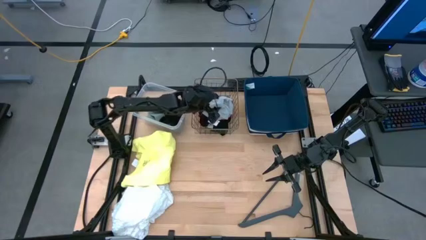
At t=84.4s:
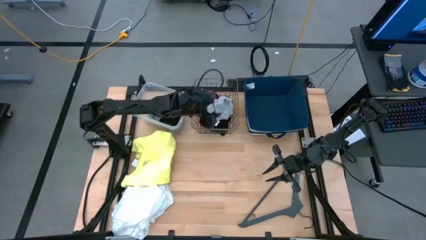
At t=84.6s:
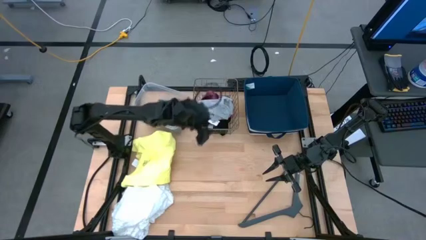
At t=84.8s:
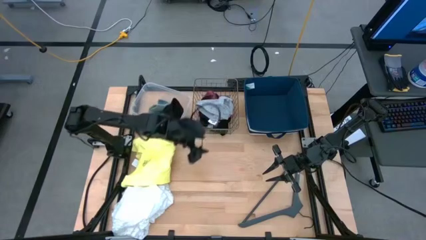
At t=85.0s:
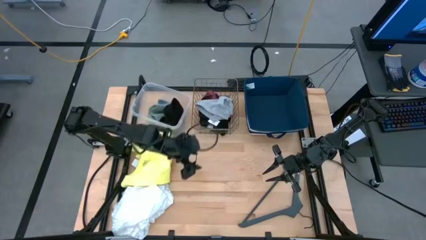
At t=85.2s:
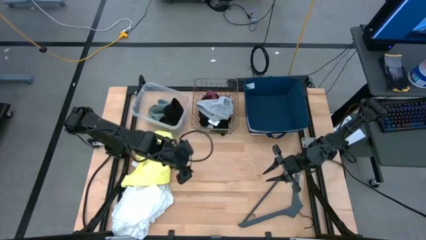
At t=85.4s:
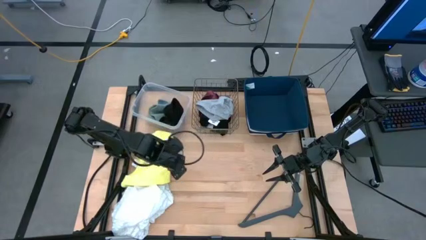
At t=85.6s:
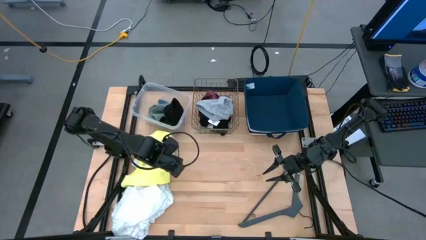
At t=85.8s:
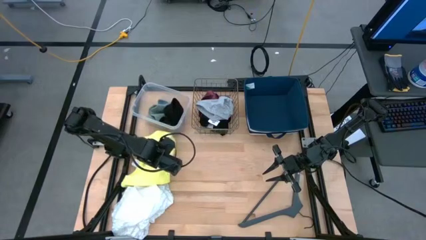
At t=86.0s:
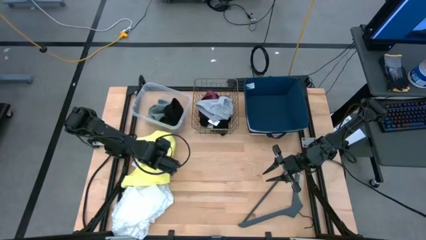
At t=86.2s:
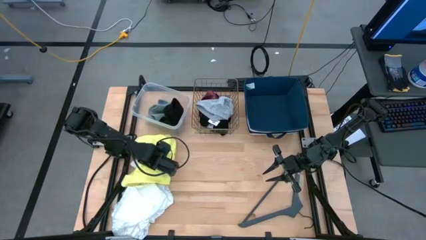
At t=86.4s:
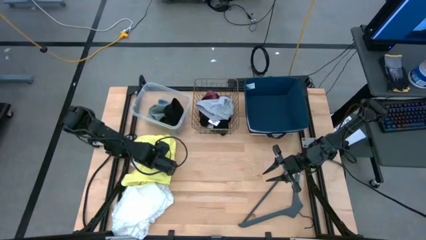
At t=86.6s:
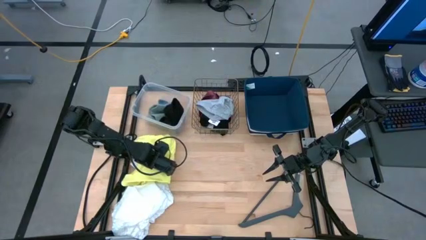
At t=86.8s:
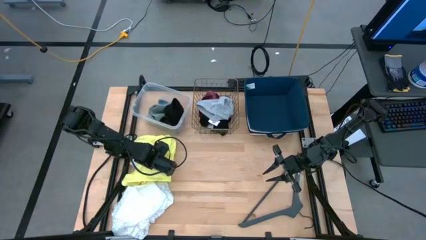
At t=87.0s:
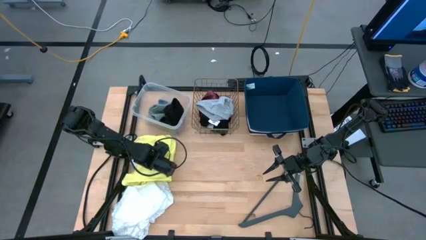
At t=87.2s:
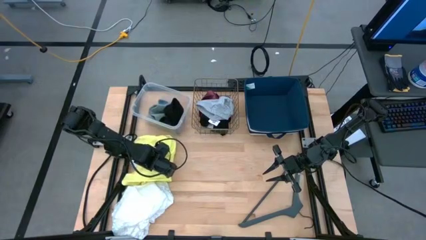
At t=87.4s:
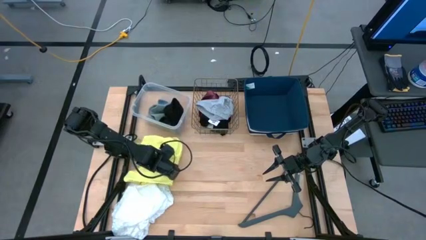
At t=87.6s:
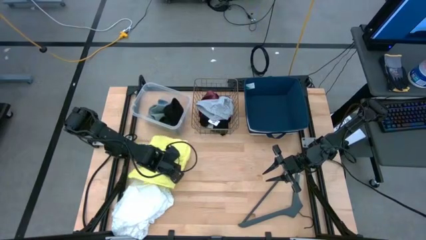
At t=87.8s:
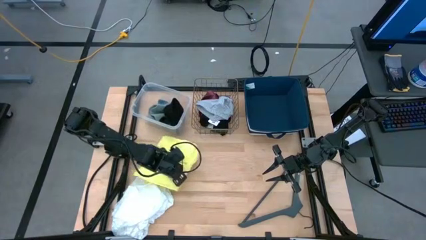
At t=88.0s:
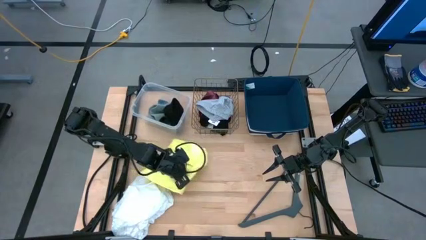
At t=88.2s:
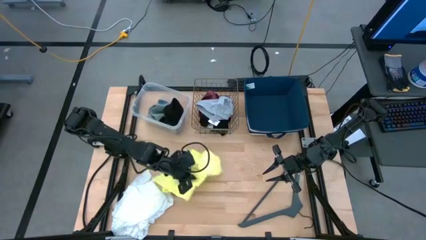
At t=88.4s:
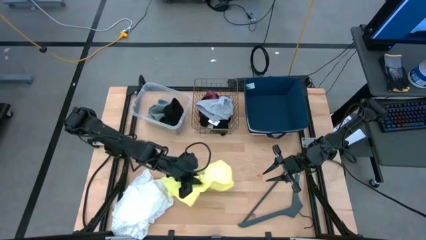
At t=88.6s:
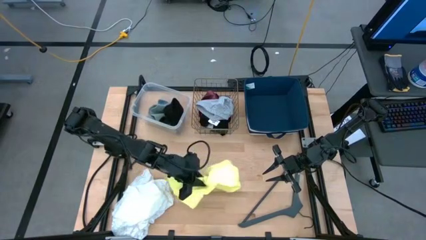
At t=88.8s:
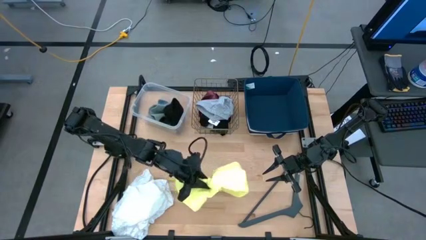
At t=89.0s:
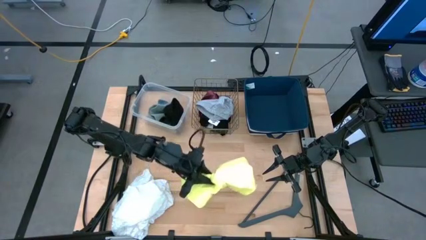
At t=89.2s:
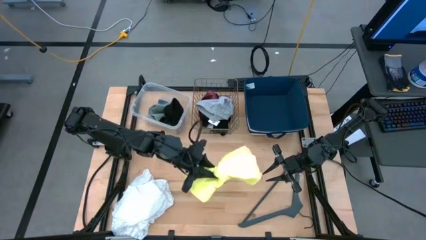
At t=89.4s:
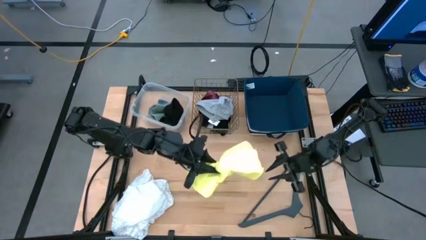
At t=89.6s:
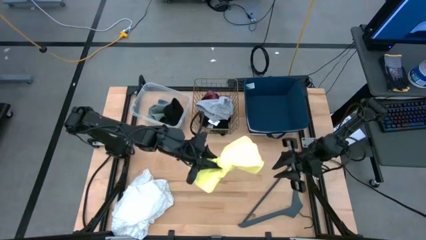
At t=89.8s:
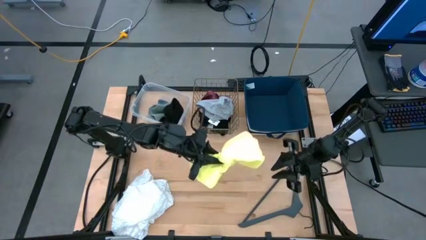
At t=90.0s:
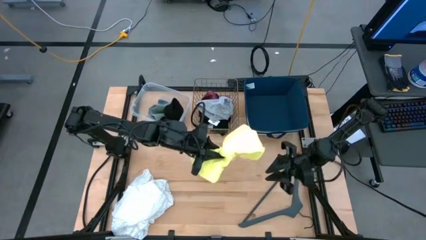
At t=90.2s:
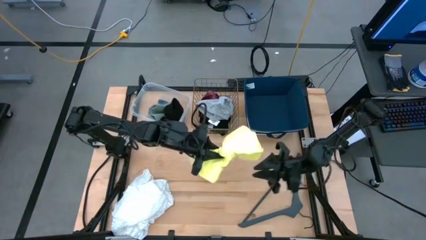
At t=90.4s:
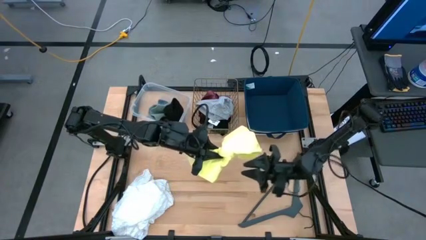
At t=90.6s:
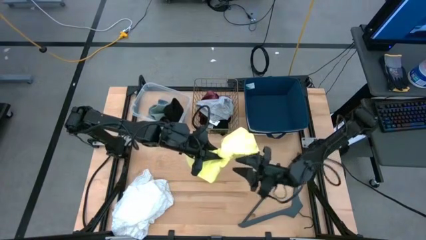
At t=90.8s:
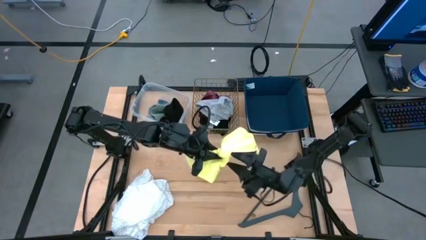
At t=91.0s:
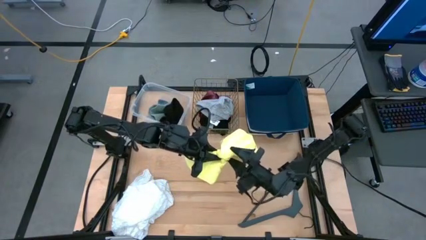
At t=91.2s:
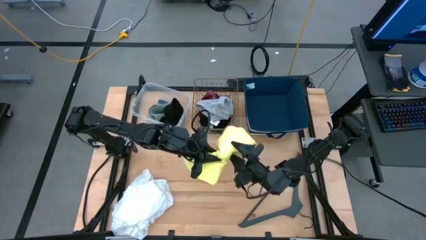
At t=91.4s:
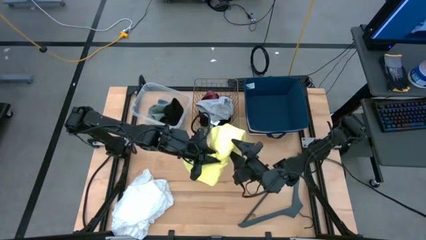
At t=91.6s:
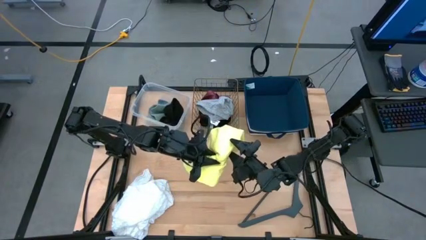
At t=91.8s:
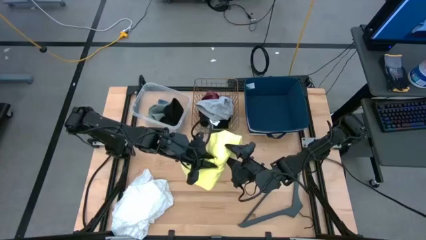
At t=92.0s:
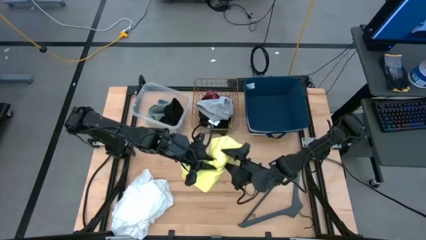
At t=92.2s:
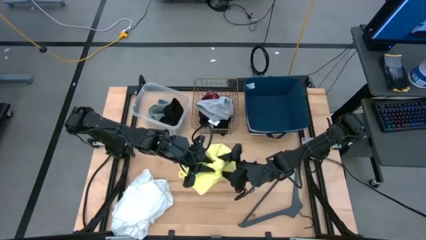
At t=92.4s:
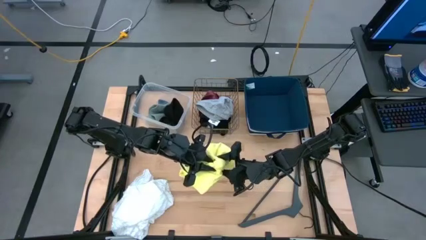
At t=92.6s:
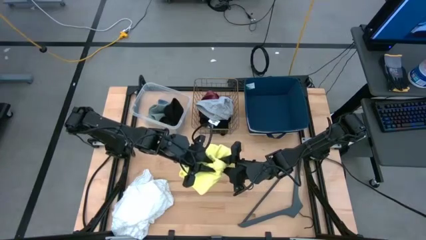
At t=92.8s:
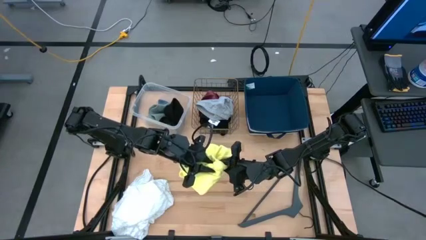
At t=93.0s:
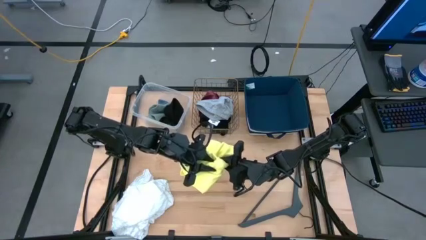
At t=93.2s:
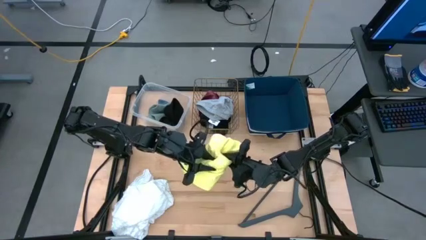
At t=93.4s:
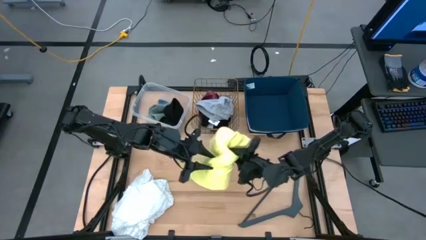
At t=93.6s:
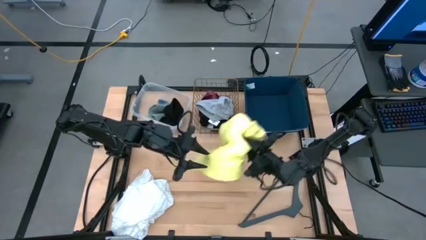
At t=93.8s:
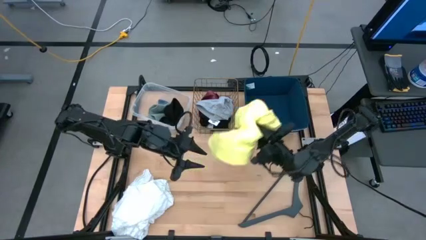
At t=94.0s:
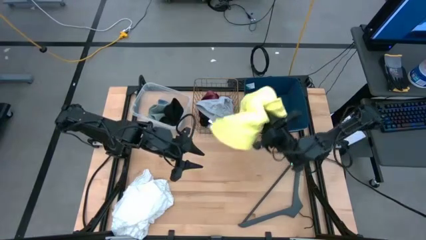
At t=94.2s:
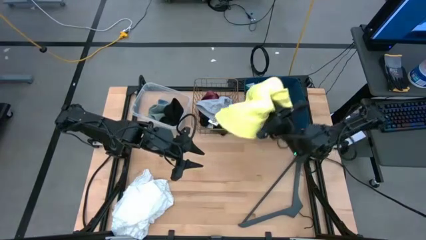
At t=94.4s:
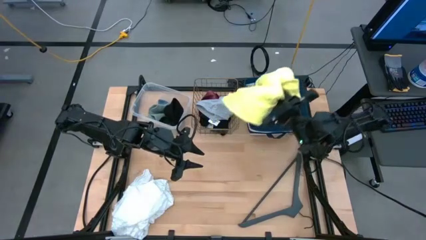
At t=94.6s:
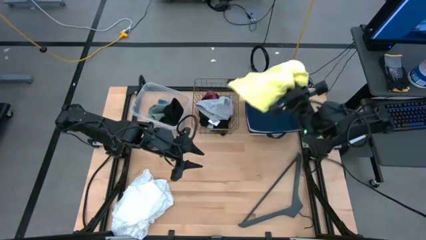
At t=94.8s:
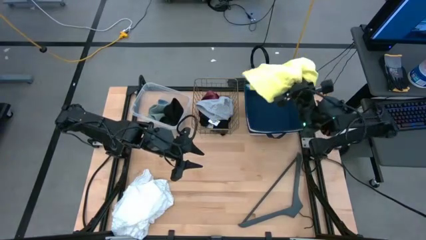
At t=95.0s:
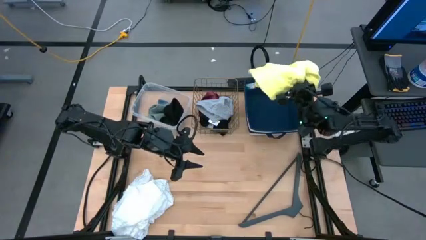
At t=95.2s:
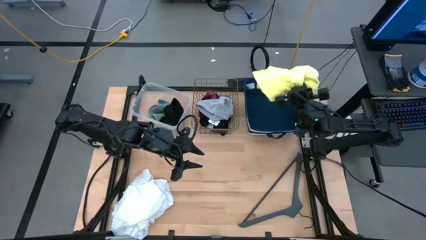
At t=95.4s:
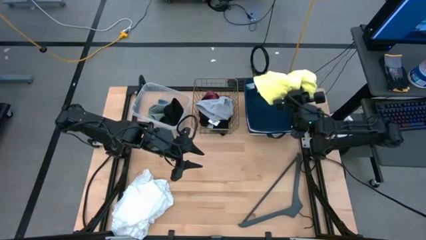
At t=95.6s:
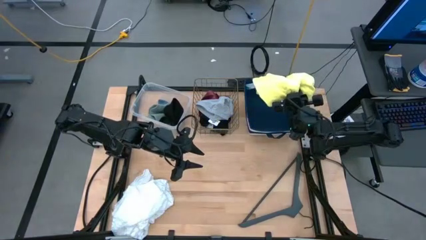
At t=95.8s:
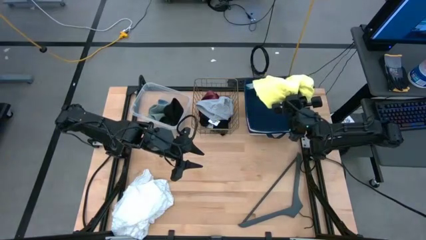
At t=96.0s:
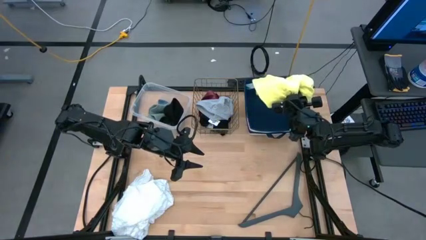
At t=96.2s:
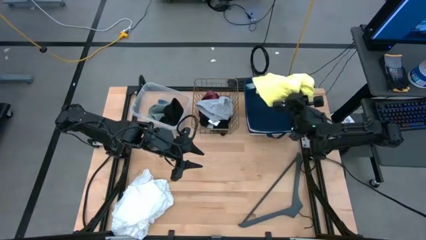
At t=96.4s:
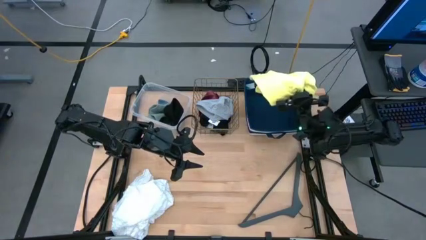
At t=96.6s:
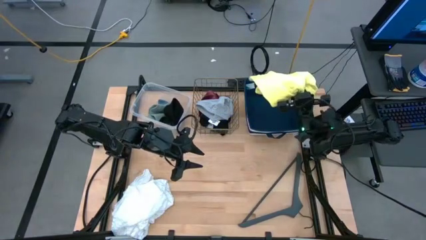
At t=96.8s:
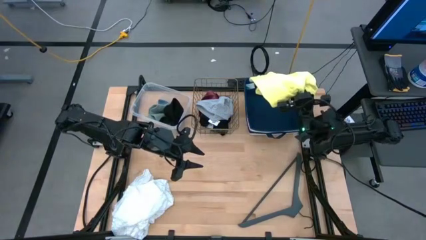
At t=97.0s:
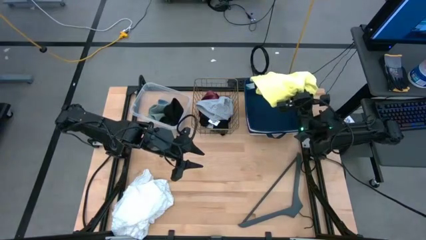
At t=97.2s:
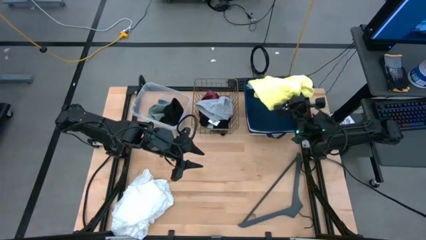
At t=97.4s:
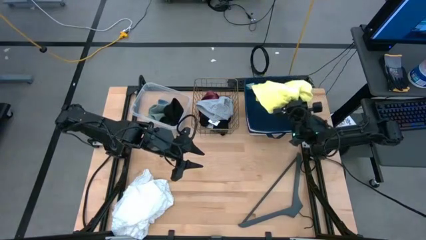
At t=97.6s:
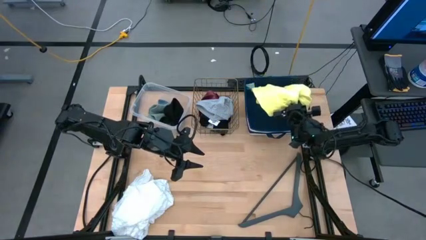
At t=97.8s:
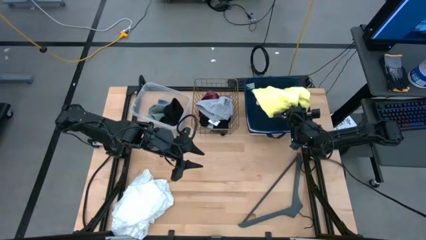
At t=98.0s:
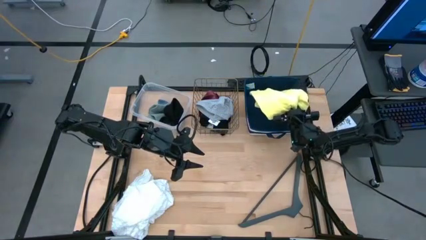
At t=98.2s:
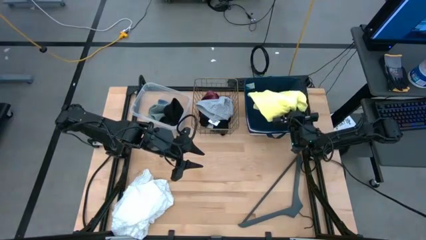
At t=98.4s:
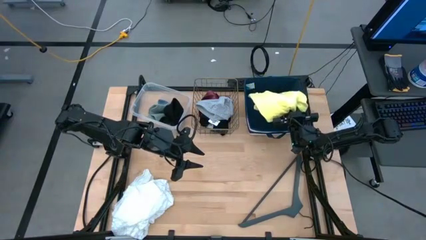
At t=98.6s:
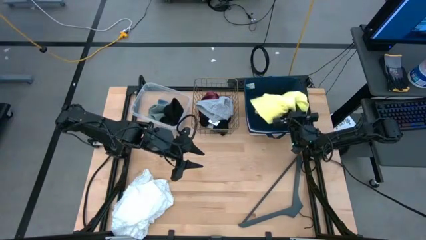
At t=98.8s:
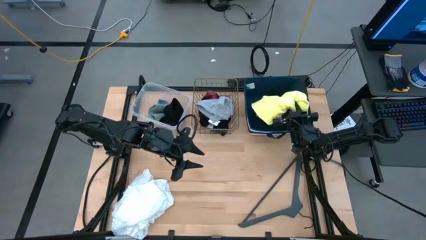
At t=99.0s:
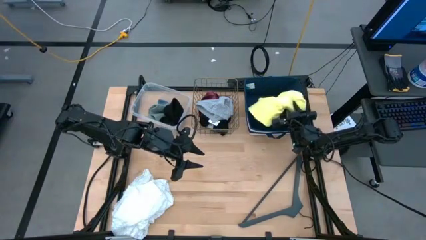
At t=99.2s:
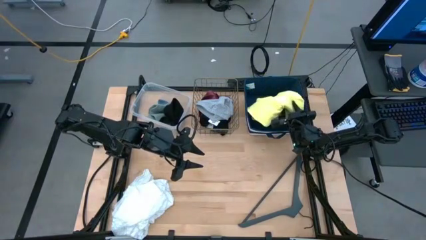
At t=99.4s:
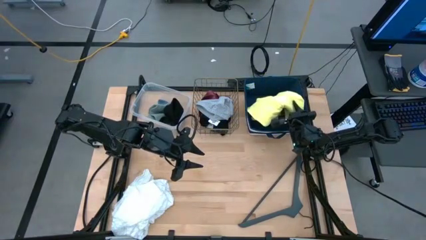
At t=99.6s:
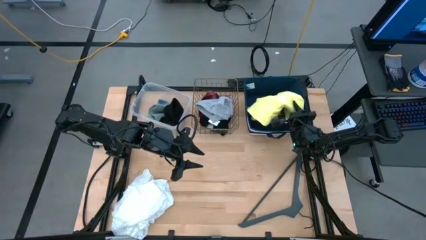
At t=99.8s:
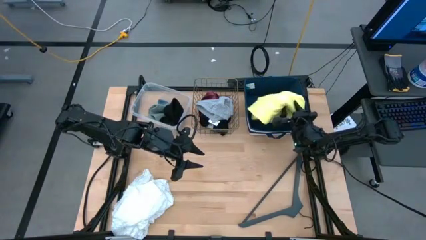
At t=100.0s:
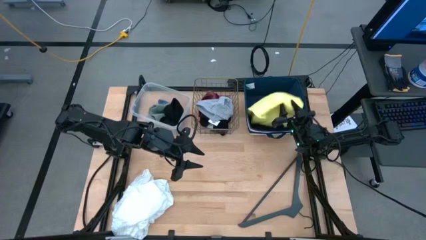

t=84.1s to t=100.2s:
Task: Pick & Place Cloths
Put the yellow cloth into the blue bin

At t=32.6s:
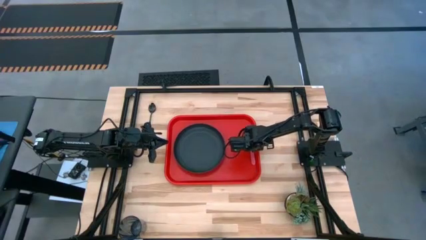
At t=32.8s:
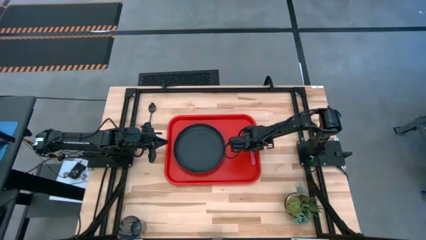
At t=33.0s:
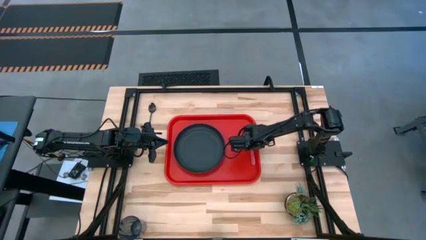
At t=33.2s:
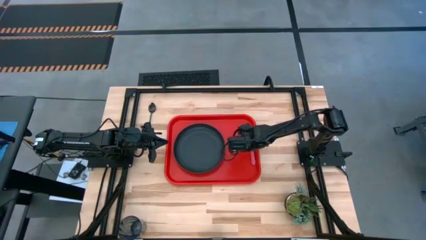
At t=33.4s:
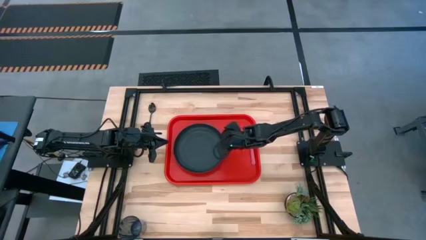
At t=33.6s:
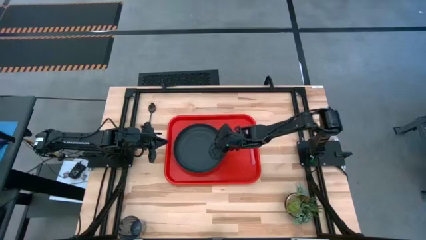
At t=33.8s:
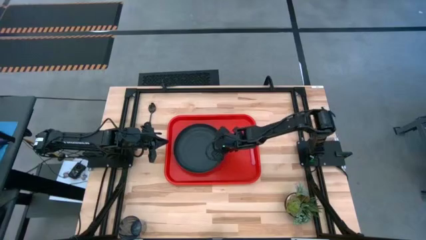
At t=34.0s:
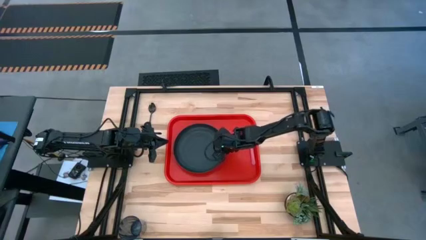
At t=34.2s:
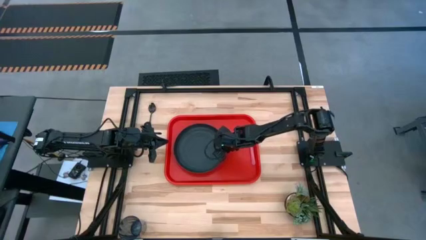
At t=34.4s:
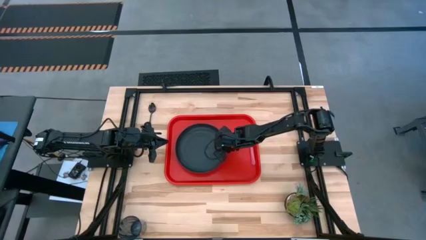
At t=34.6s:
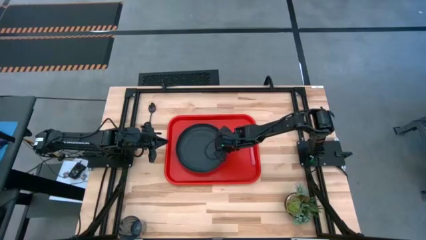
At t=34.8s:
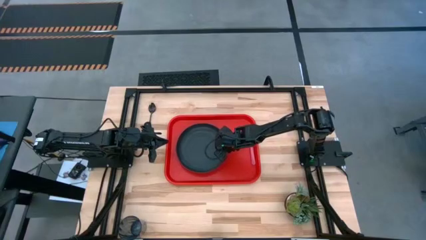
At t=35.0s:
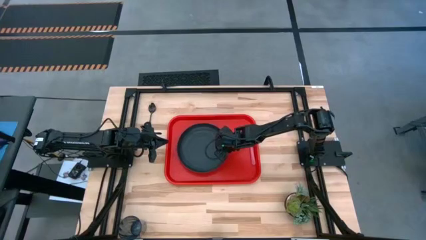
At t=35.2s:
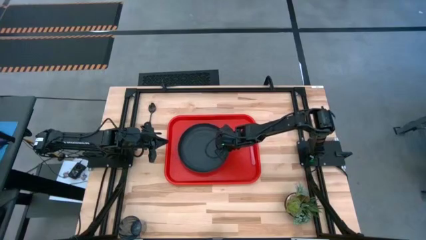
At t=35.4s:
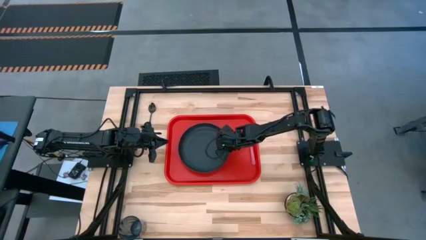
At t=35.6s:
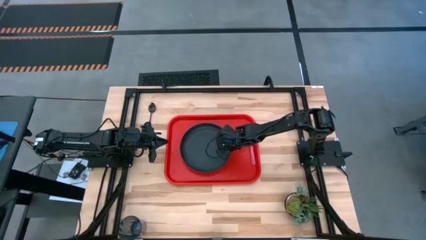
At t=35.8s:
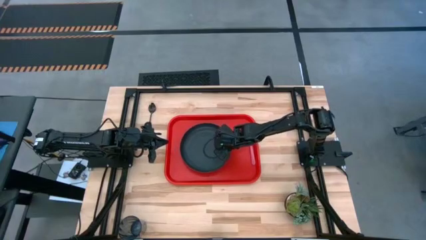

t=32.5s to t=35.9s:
Task: Pick and place plate/cup/fork/spoon on tray
Adjust the black plate on the red tray
